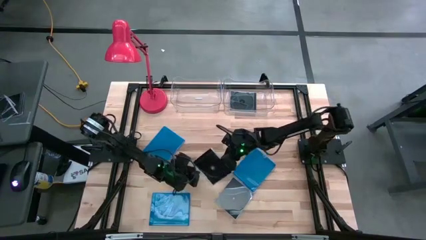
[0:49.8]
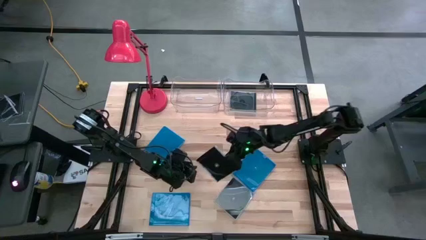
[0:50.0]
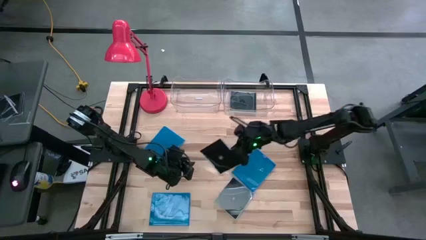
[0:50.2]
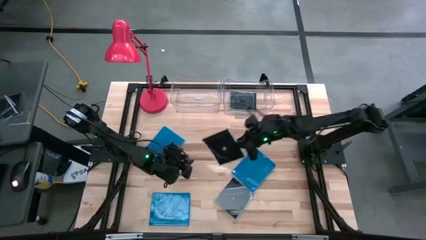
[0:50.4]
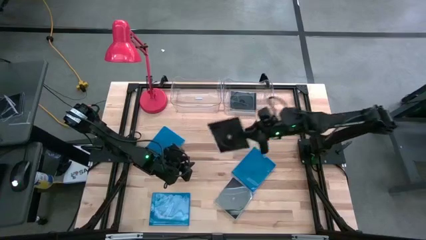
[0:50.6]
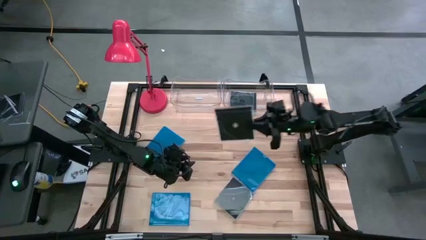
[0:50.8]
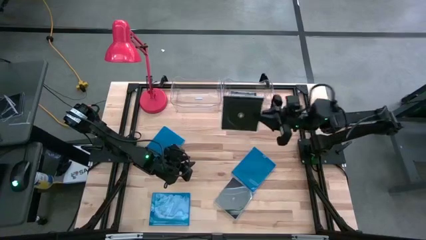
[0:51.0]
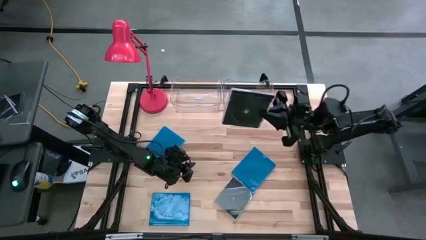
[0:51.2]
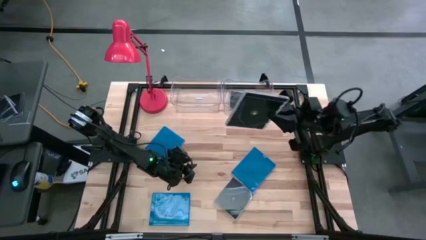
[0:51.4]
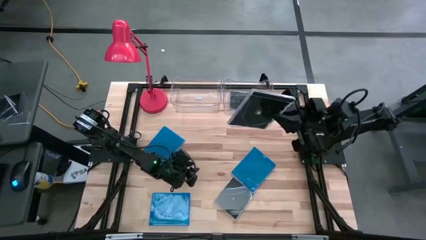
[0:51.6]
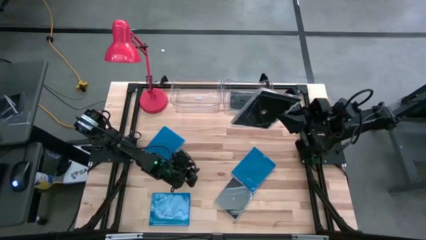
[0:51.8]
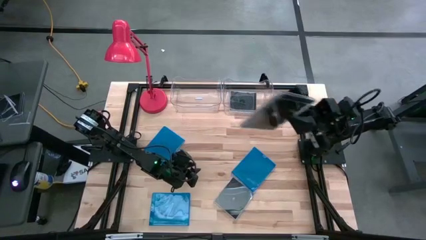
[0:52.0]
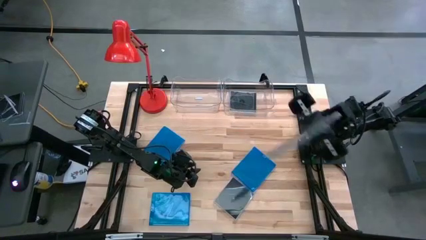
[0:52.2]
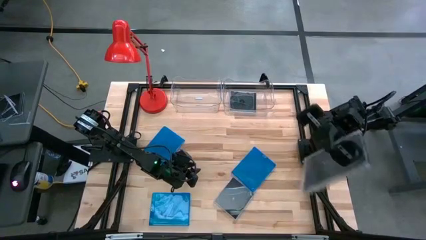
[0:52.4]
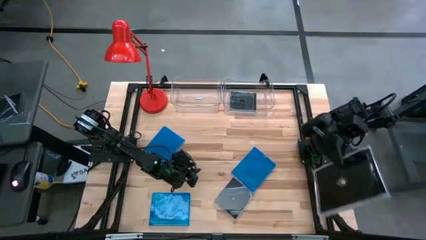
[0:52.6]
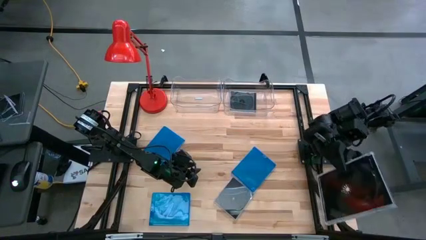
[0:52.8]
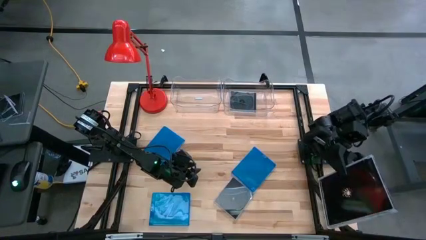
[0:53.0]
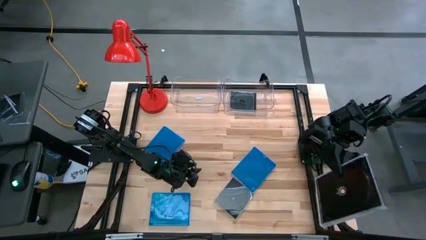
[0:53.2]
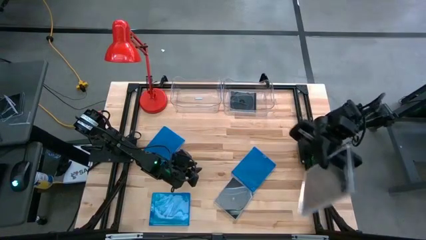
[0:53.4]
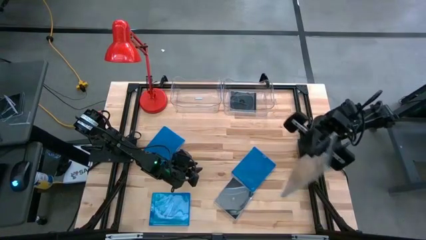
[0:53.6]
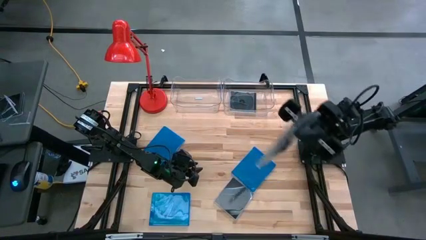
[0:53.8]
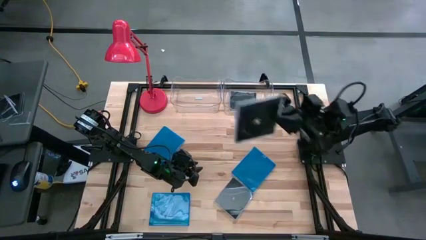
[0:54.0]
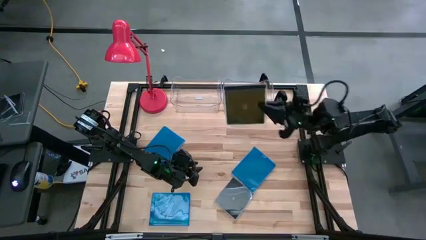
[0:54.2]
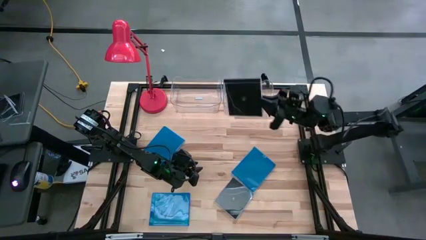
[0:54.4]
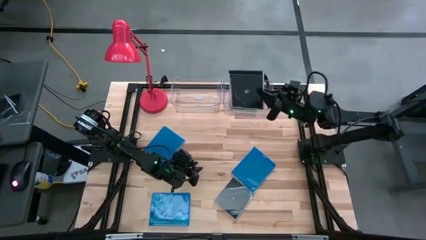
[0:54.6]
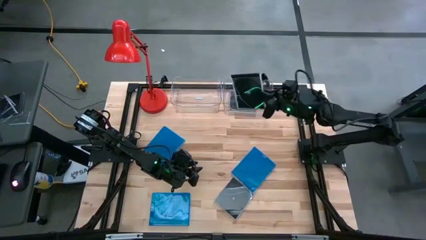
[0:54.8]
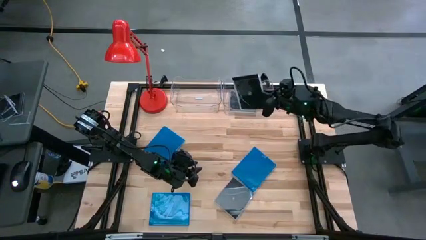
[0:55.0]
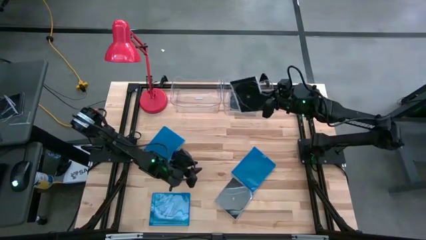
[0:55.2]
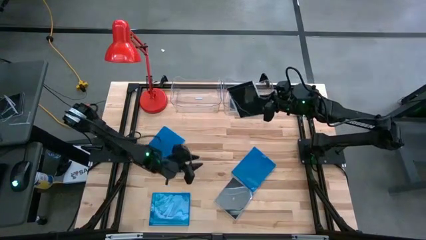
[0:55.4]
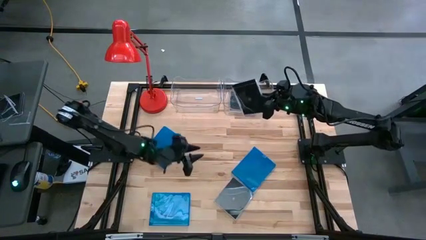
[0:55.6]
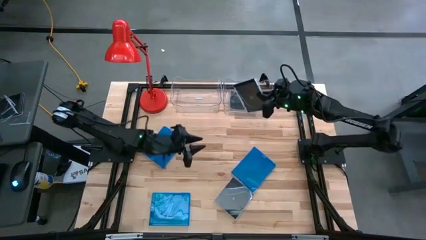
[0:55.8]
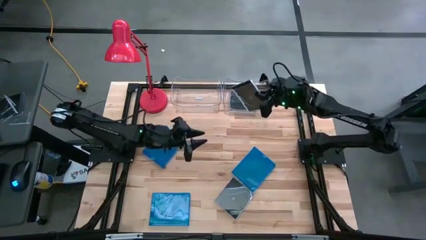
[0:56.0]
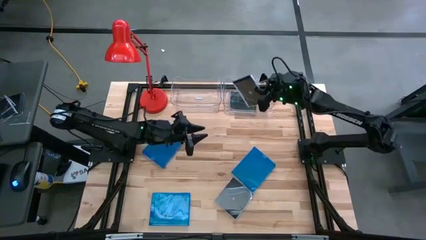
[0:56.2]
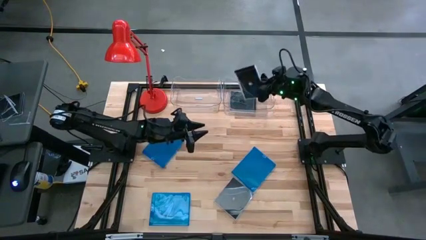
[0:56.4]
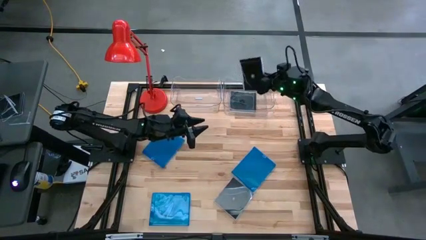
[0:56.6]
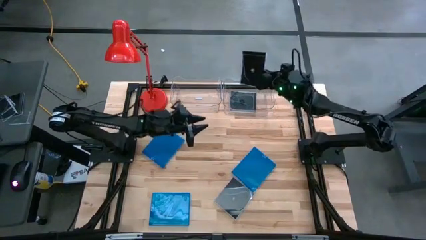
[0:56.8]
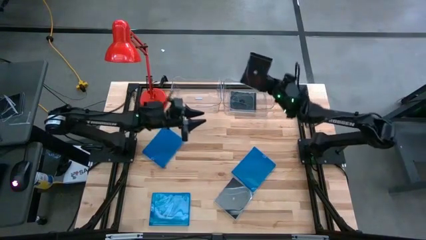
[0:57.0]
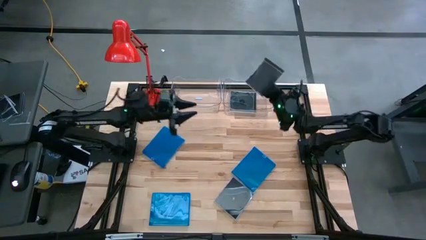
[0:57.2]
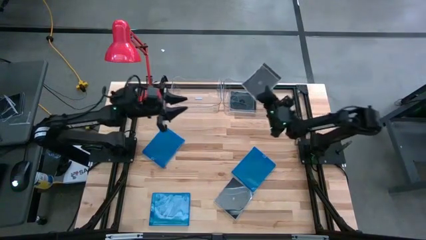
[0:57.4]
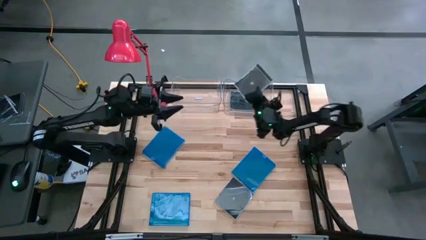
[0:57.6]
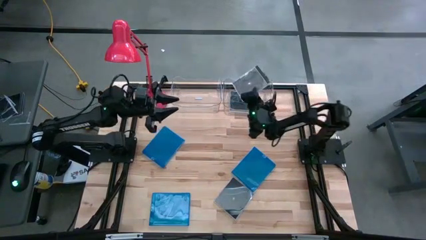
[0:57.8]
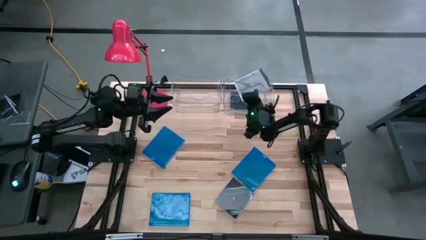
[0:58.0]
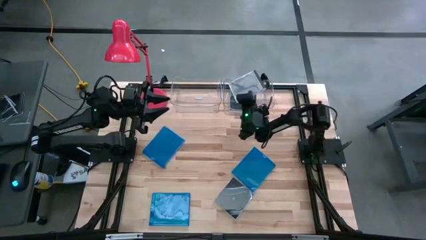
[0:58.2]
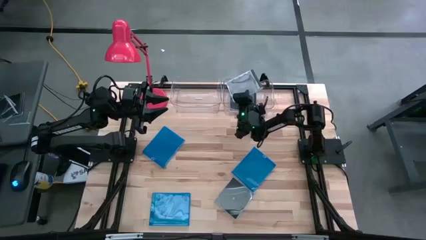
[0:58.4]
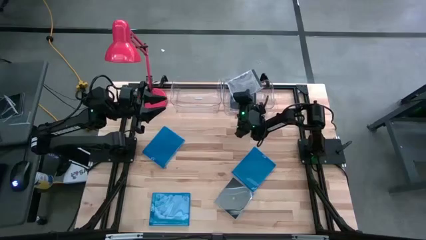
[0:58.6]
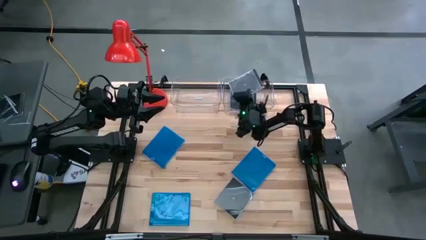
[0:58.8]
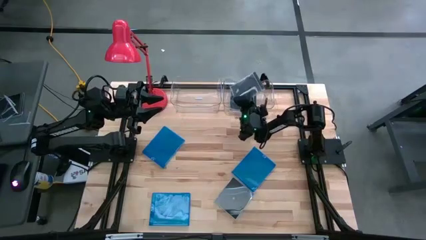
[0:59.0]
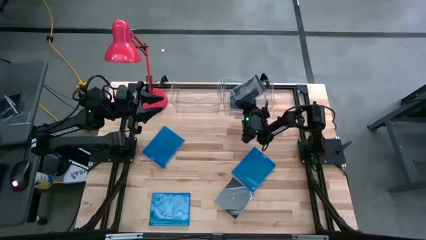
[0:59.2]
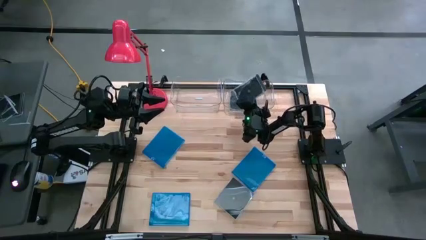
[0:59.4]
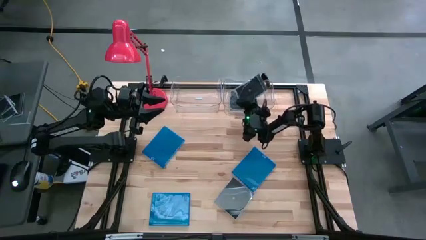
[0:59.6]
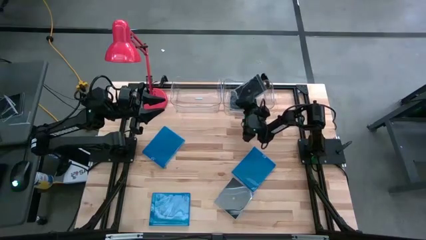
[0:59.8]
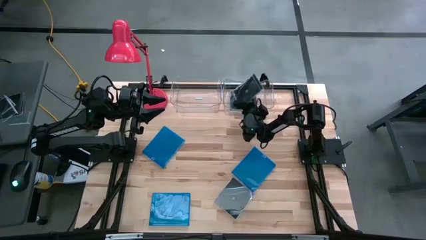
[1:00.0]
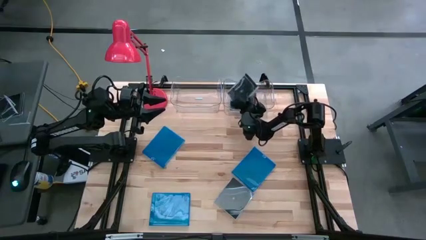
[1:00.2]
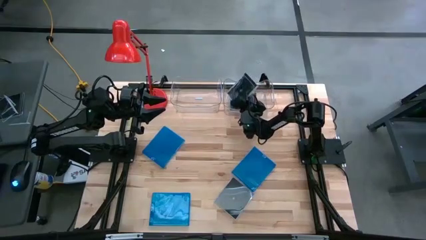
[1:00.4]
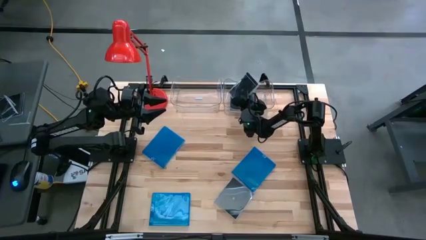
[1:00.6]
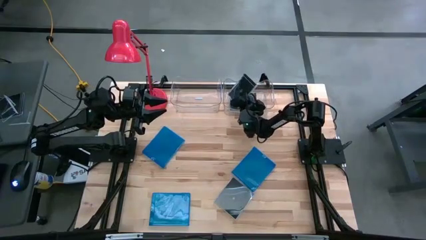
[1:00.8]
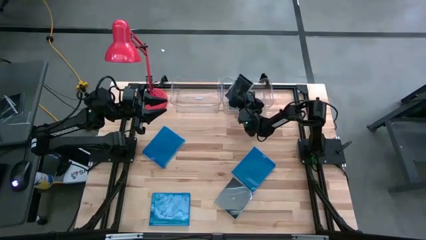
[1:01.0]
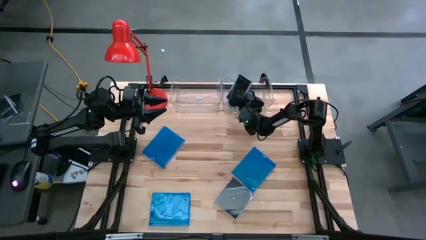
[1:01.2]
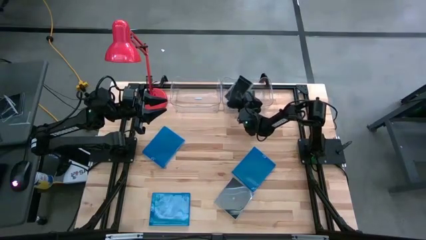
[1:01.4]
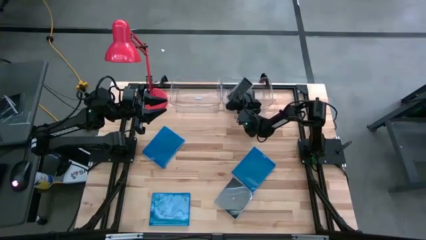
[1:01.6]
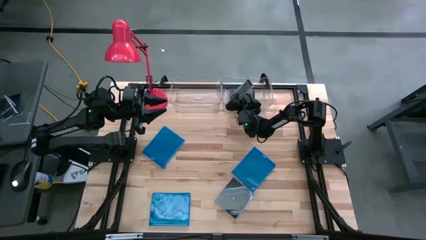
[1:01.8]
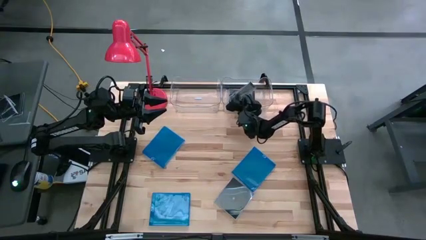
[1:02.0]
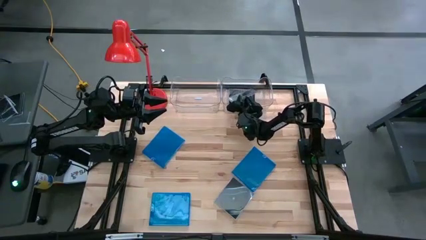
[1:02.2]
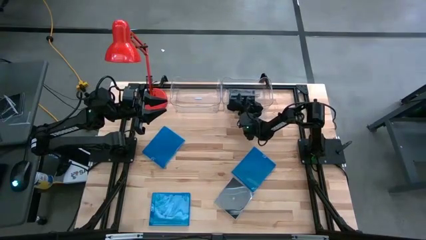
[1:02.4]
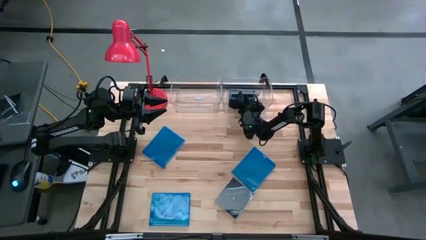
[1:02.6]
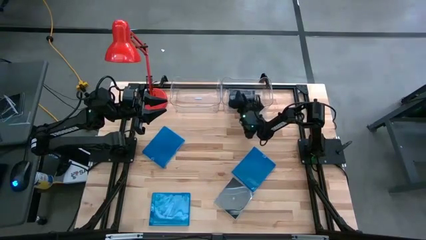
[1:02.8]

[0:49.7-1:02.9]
Task: Pick & place jewel cases by type
Put the top black cd case into the right transparent bin
